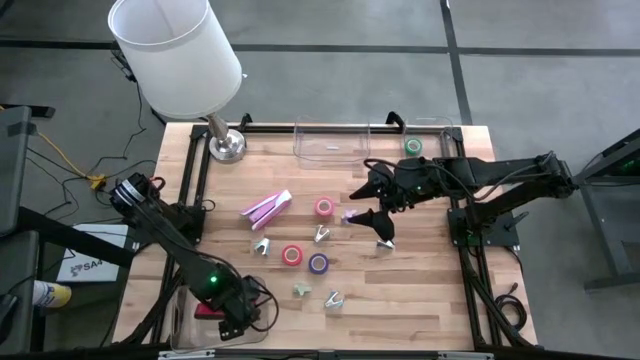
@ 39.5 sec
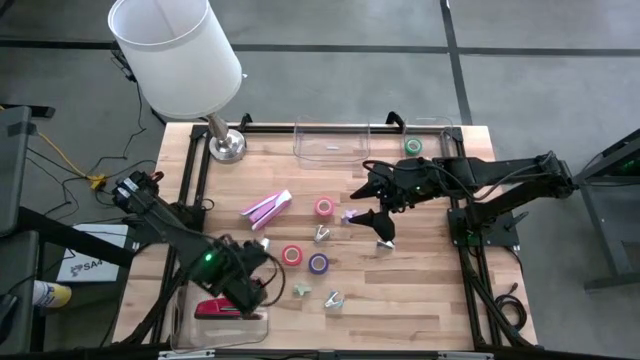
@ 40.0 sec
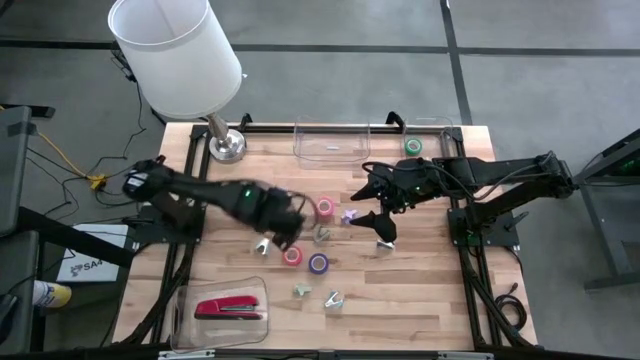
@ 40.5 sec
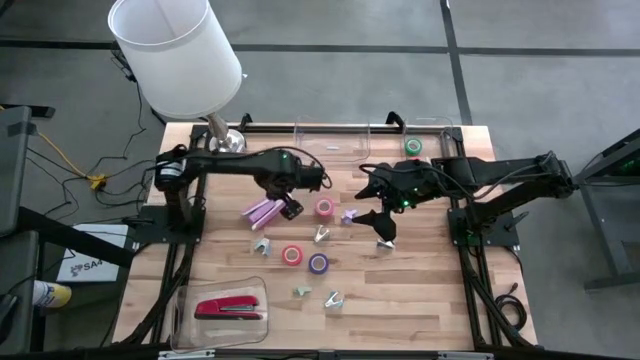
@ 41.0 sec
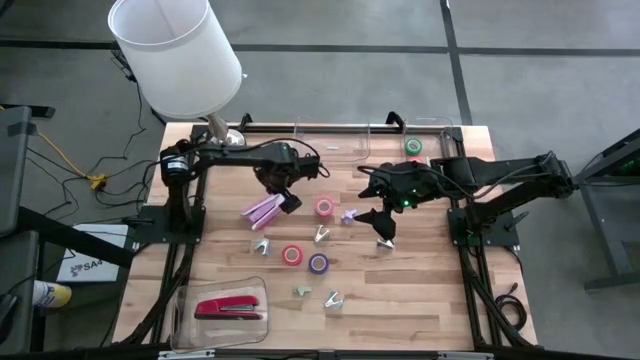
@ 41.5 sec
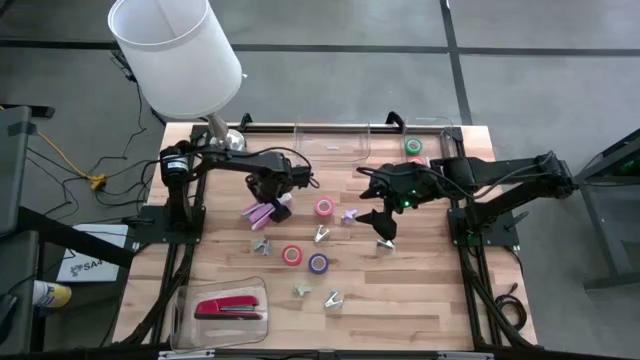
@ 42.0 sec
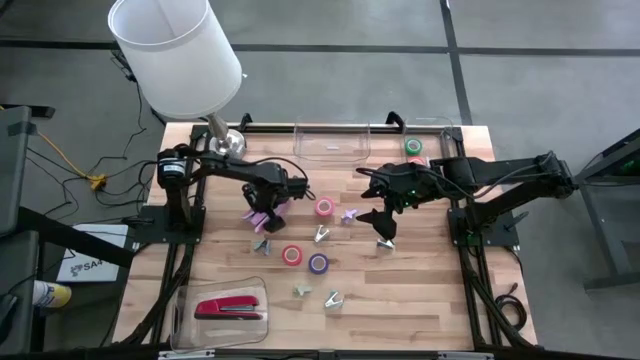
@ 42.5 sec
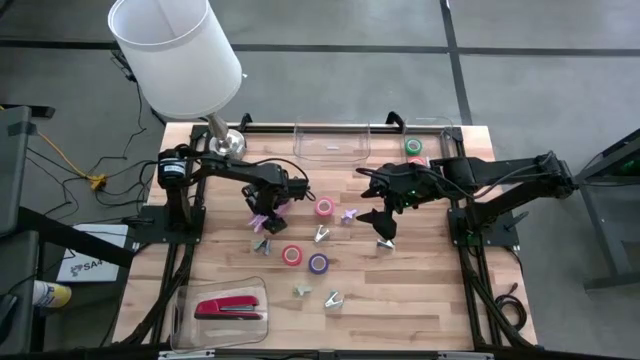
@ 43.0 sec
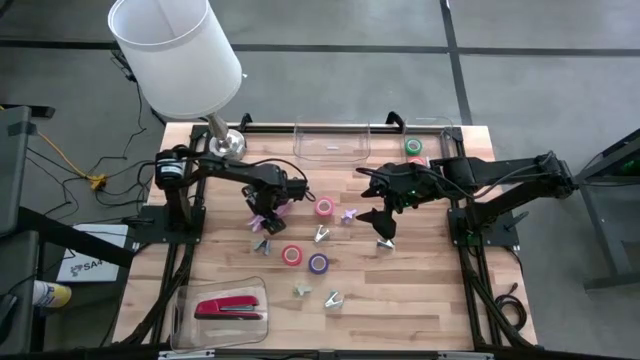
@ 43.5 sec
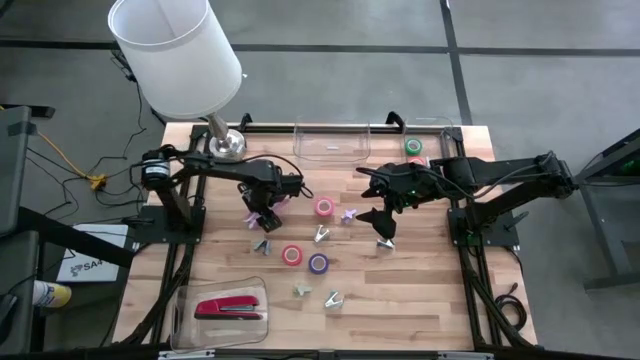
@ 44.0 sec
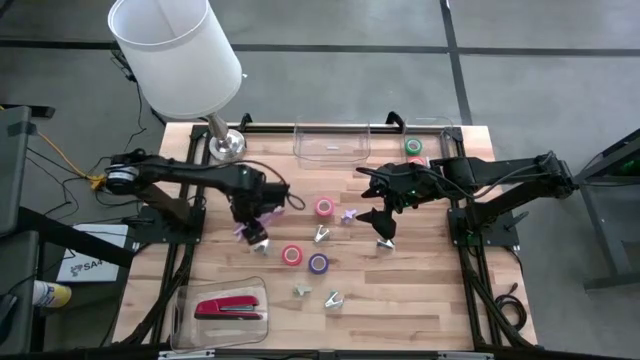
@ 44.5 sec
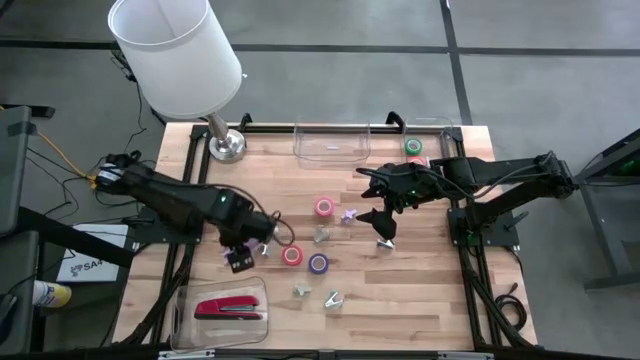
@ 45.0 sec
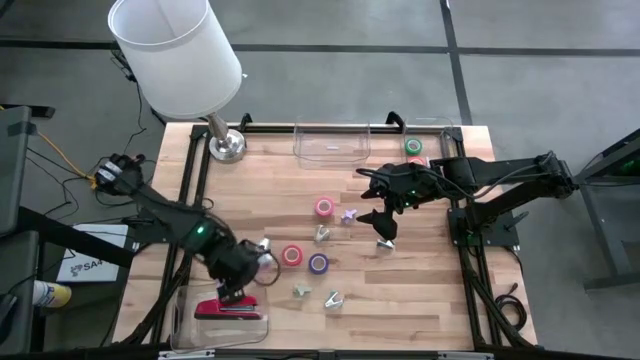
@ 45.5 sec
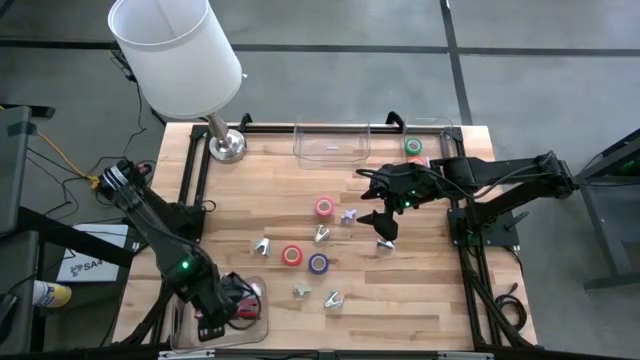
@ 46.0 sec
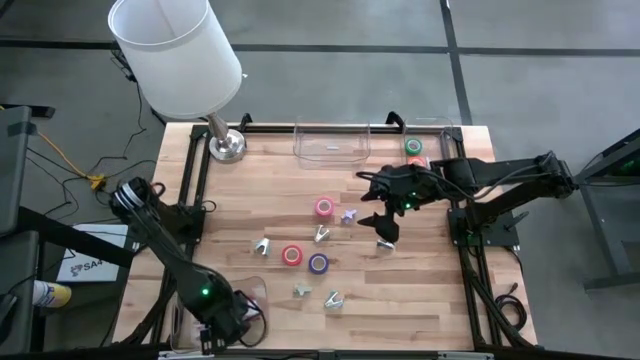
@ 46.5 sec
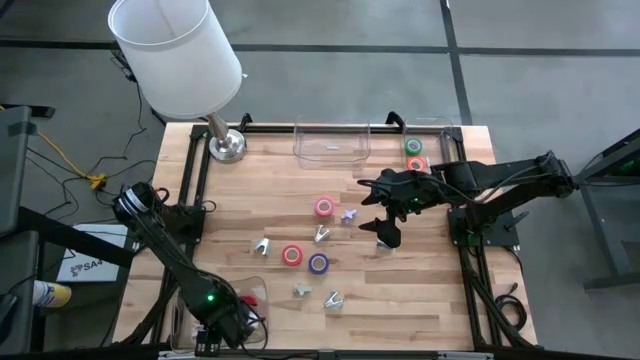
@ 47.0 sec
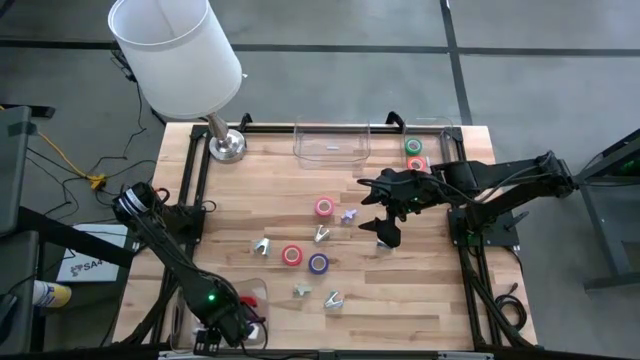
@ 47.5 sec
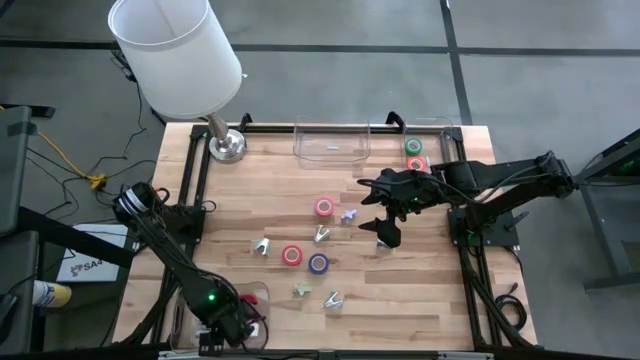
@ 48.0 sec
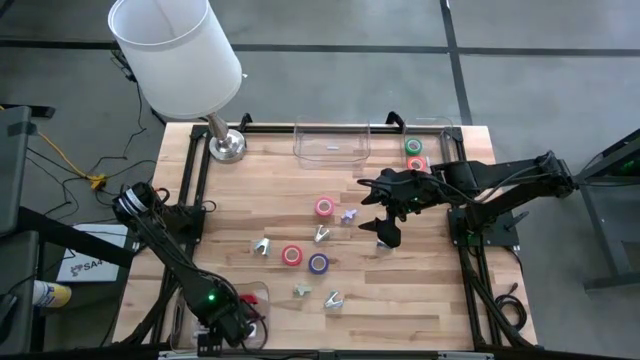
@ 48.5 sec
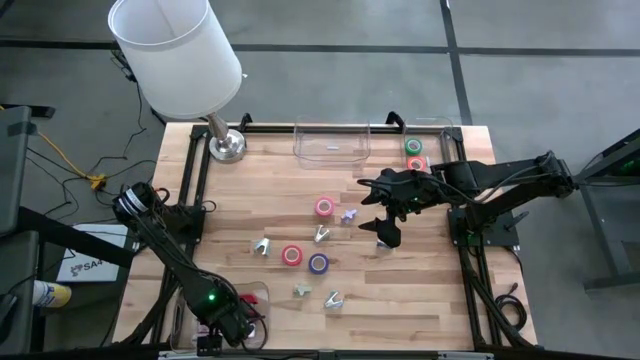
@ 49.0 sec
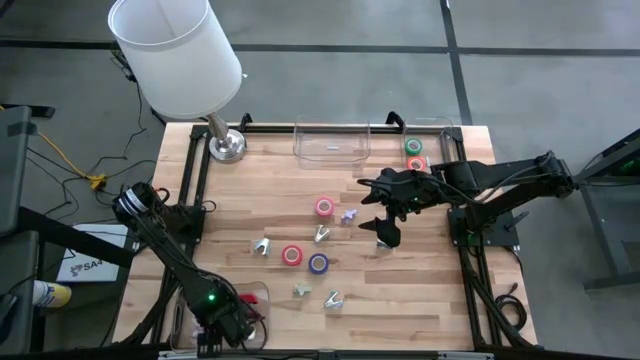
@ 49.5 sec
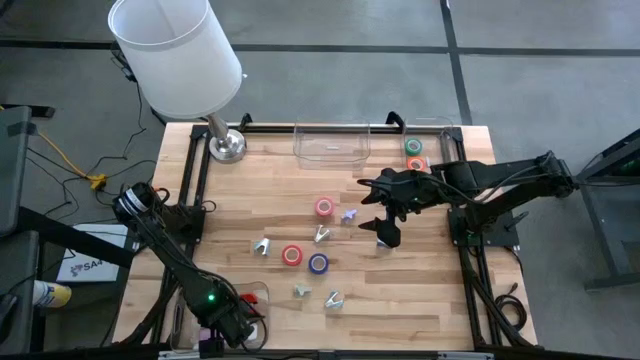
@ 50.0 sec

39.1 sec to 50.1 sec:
Task: Pick and place Stapler, Stapler remover, tape
Put the pink stapler into the bottom transparent bin

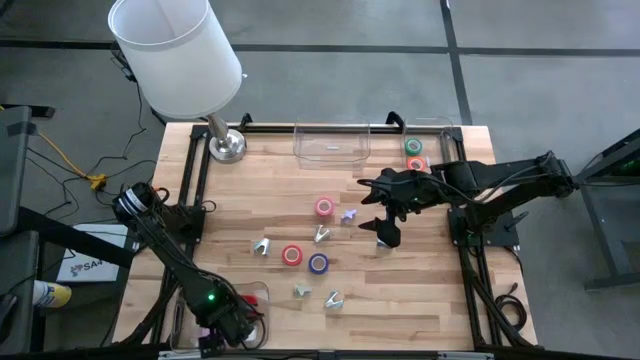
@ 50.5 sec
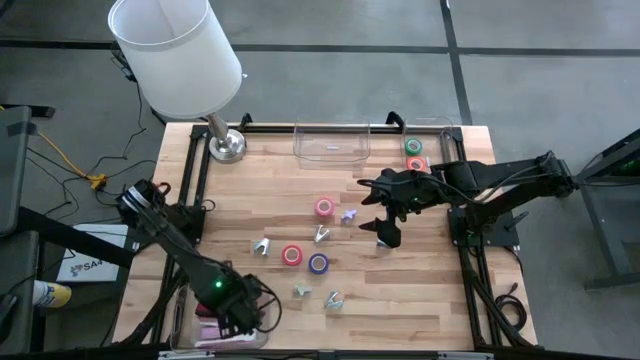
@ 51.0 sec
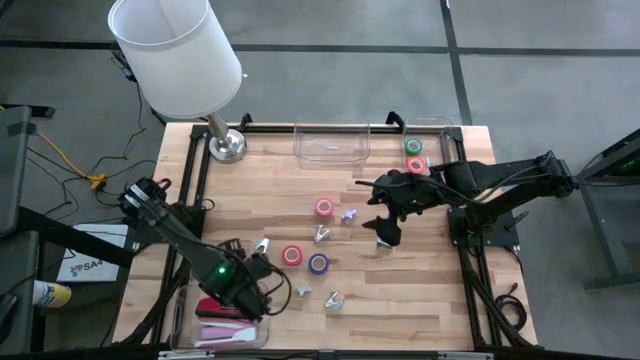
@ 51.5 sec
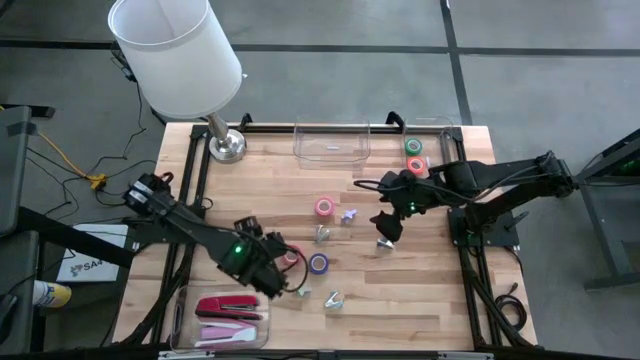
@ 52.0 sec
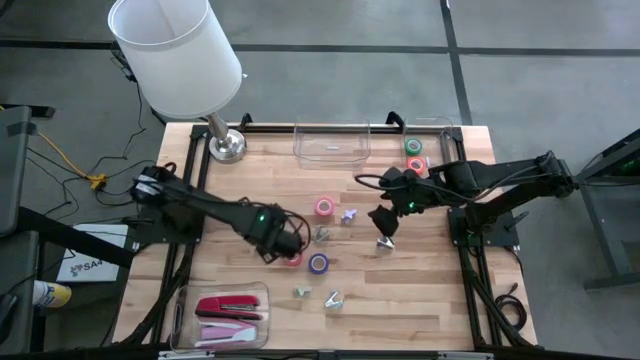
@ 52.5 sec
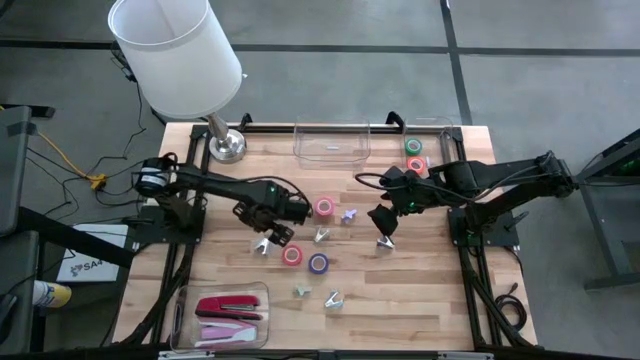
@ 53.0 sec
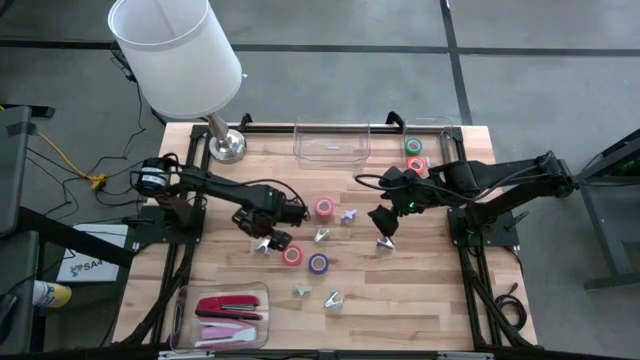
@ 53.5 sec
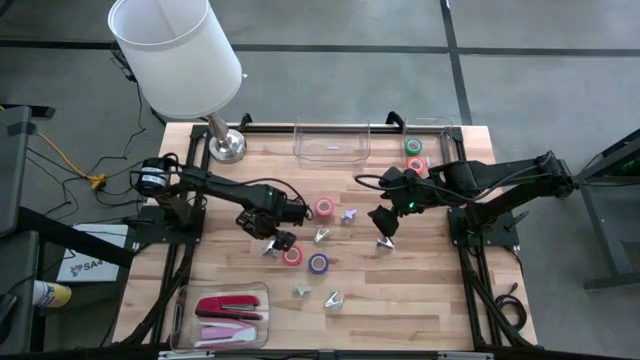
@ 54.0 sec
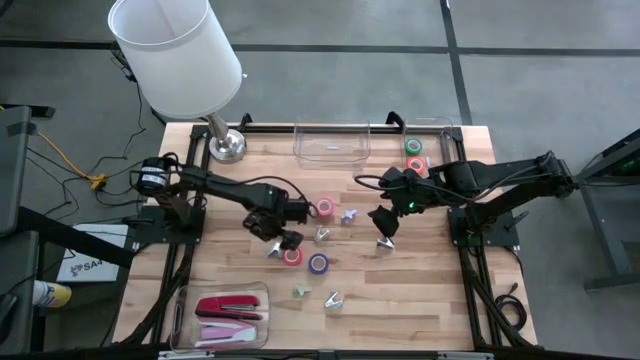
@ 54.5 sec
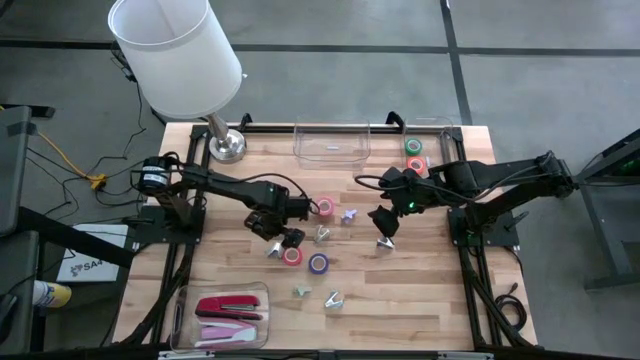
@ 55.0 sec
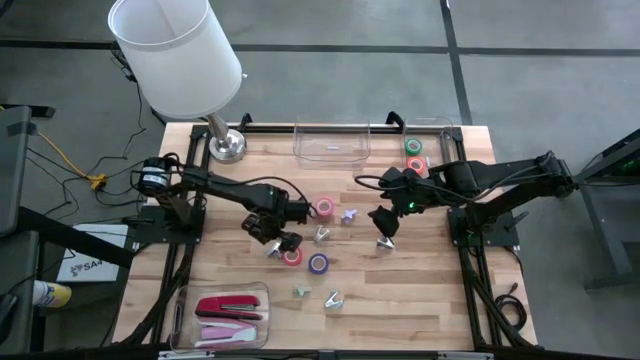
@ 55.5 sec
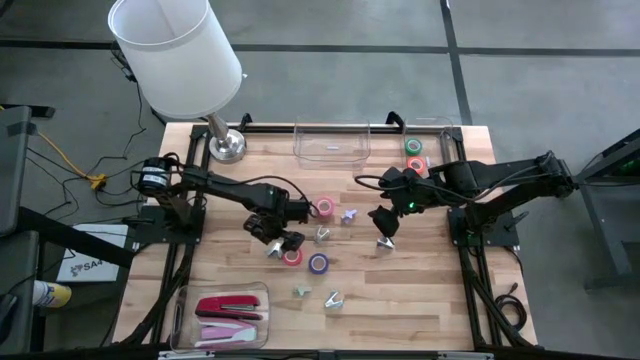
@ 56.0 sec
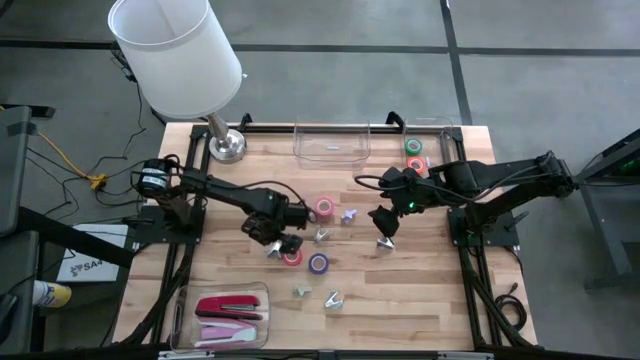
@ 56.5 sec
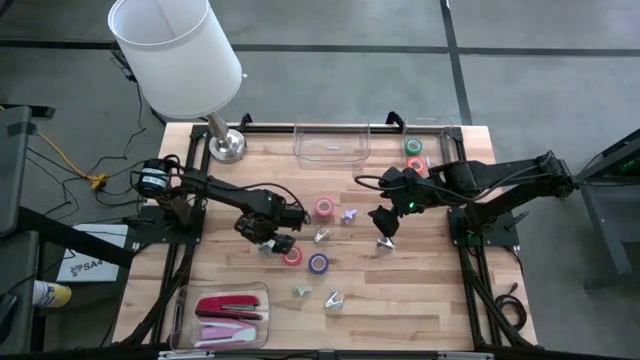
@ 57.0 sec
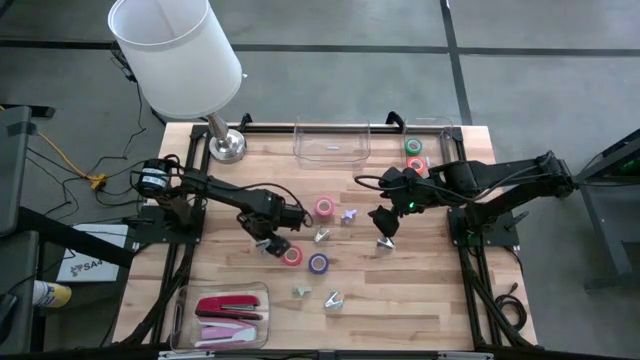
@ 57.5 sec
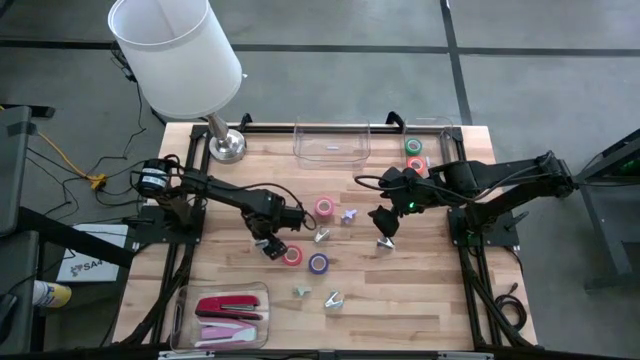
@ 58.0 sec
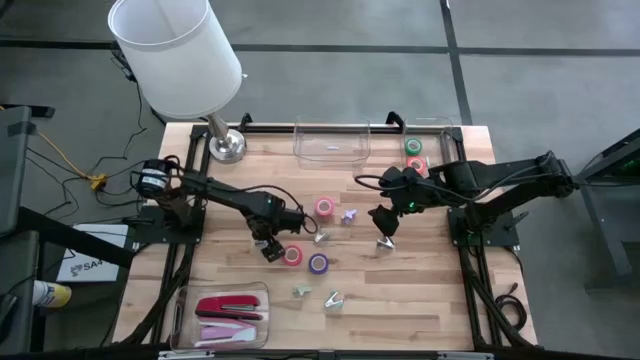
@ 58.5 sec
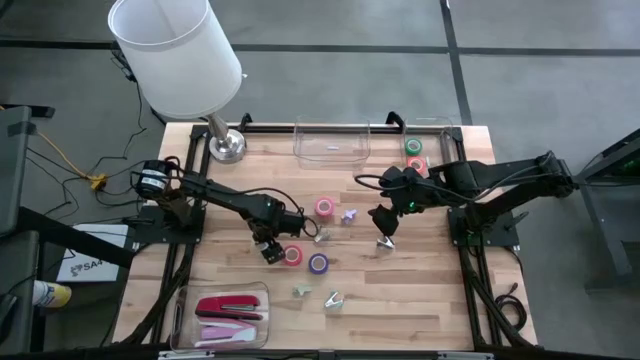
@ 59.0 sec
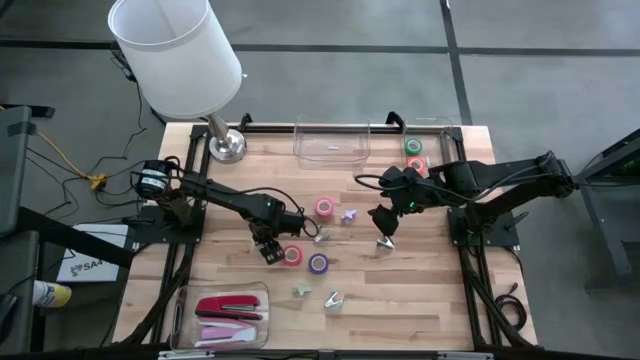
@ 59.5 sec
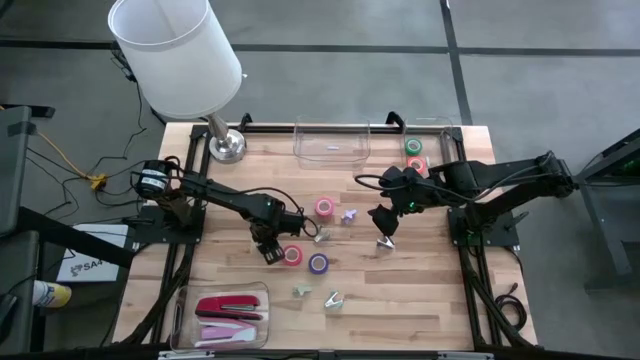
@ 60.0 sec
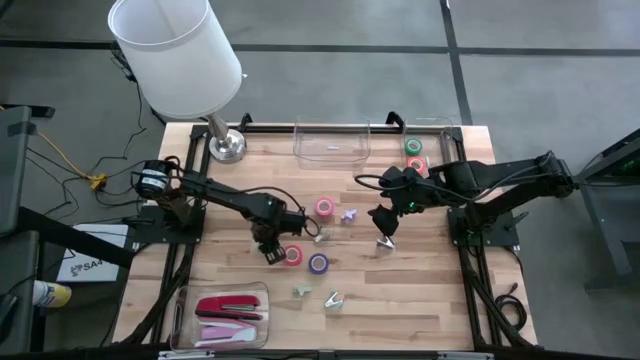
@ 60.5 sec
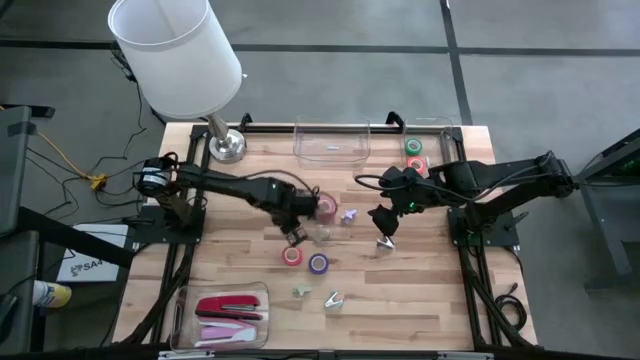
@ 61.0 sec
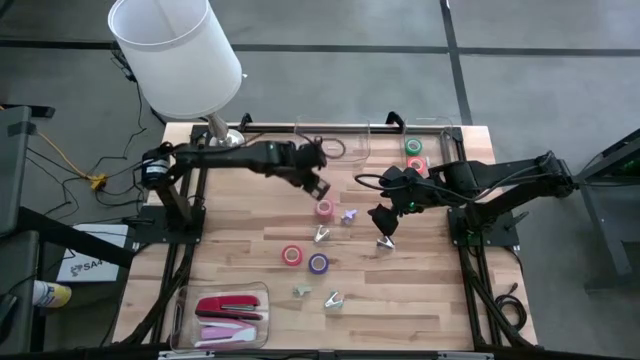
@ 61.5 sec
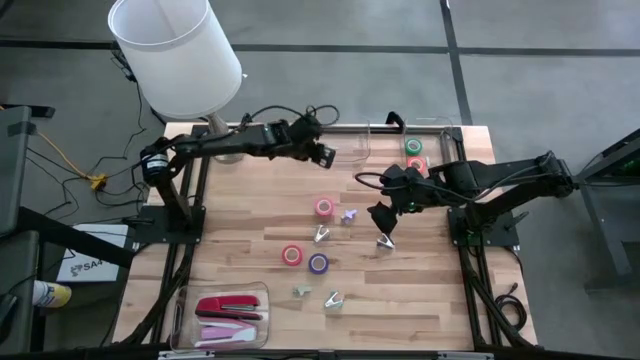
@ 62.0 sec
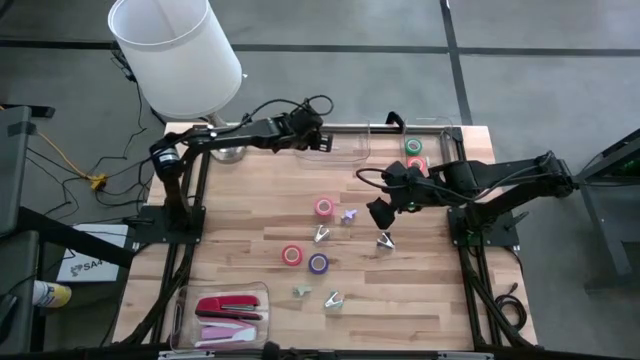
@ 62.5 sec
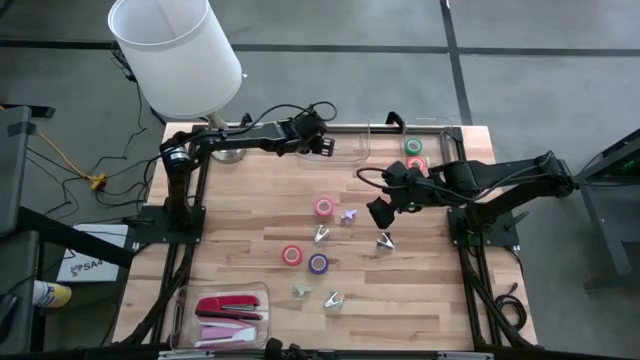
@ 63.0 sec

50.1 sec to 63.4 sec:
Put the top blue staple remover into the top left transparent bin
